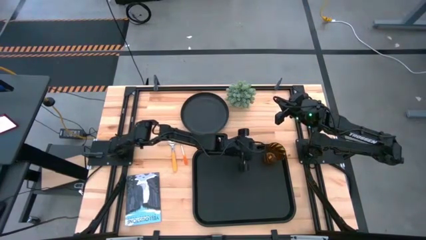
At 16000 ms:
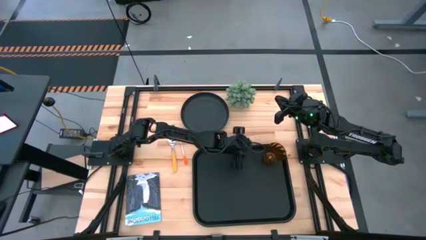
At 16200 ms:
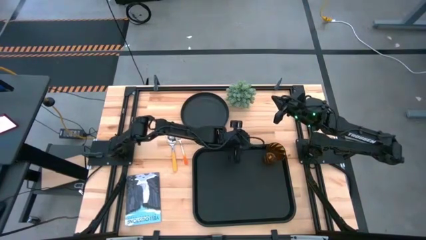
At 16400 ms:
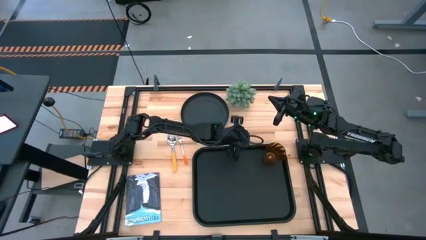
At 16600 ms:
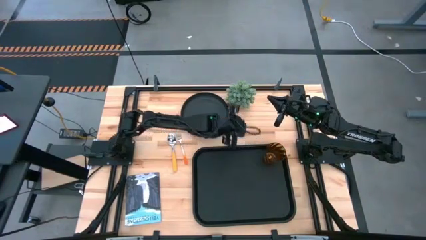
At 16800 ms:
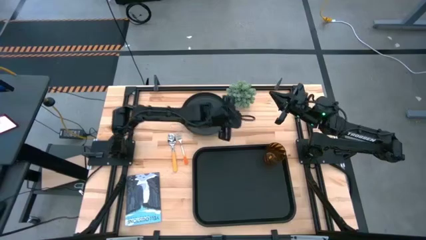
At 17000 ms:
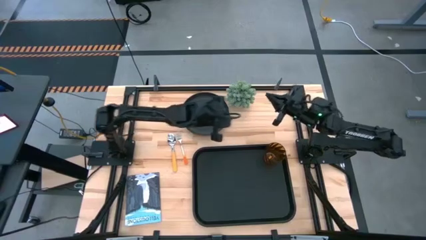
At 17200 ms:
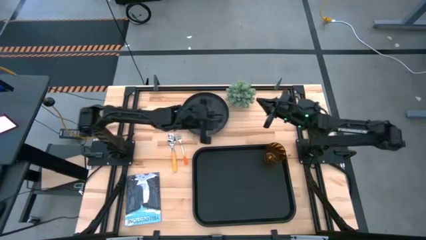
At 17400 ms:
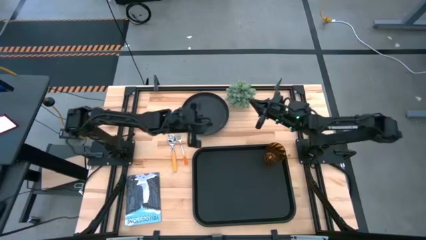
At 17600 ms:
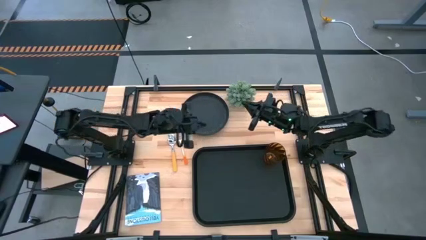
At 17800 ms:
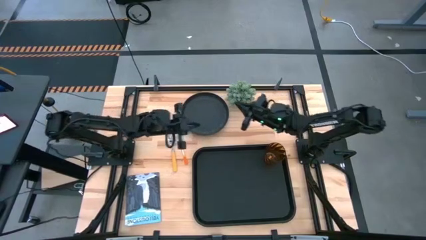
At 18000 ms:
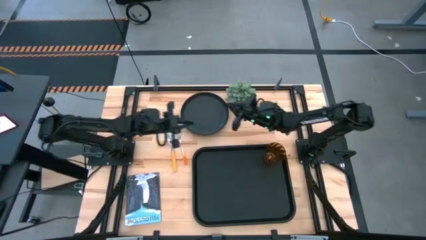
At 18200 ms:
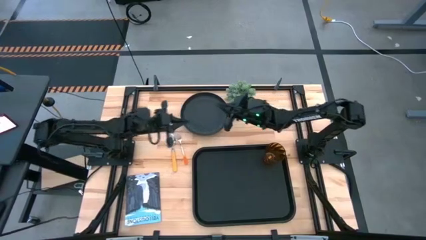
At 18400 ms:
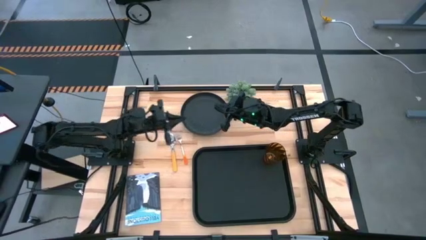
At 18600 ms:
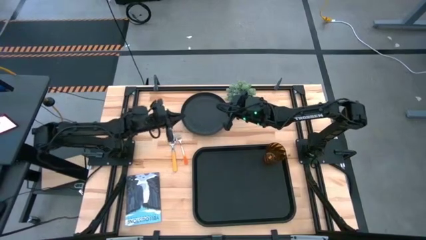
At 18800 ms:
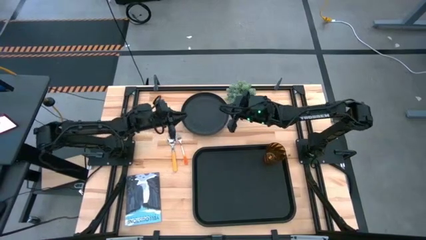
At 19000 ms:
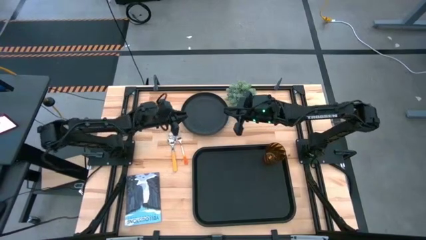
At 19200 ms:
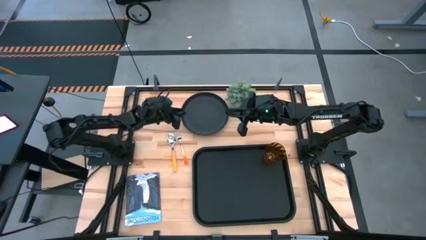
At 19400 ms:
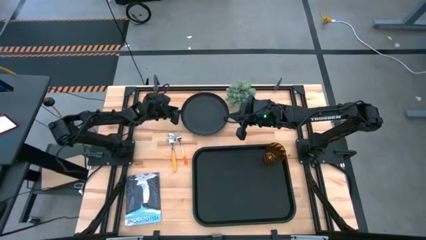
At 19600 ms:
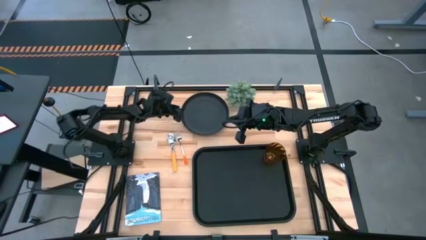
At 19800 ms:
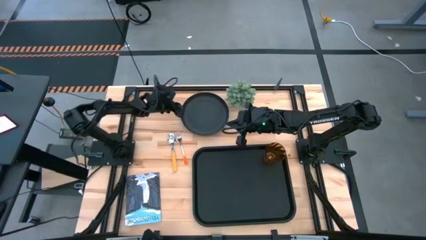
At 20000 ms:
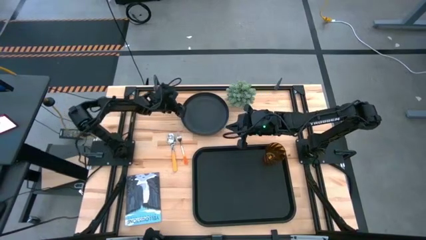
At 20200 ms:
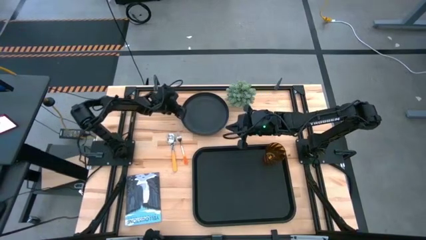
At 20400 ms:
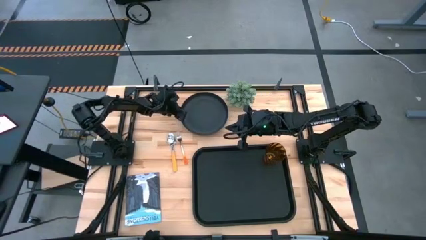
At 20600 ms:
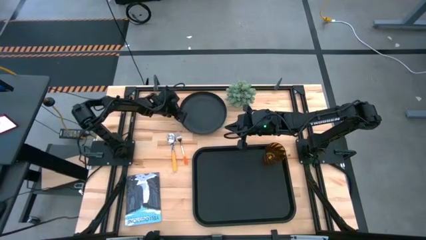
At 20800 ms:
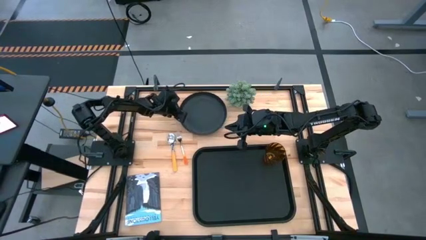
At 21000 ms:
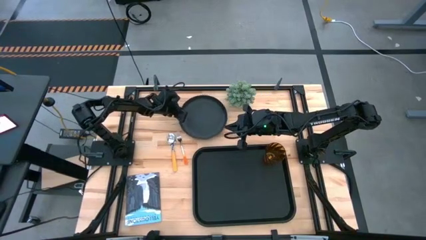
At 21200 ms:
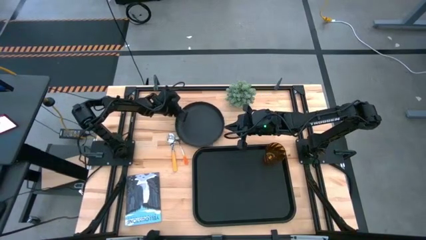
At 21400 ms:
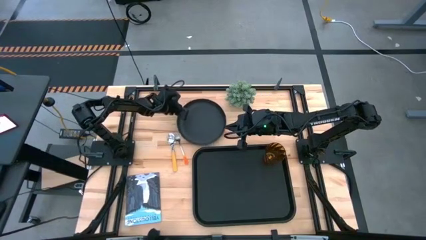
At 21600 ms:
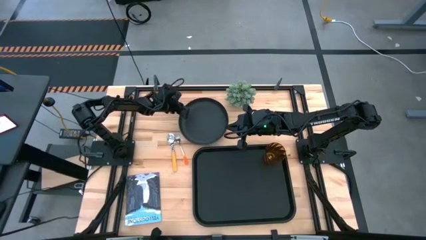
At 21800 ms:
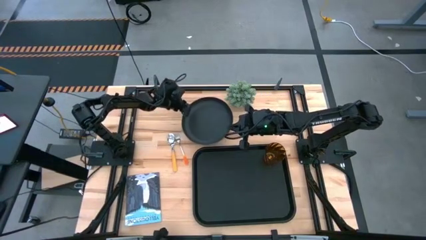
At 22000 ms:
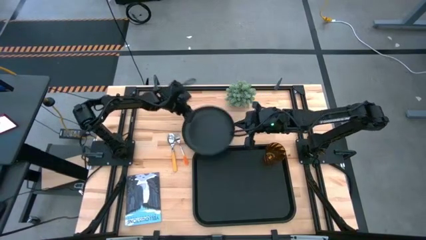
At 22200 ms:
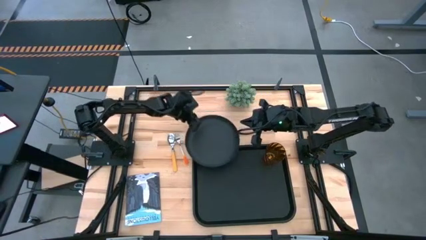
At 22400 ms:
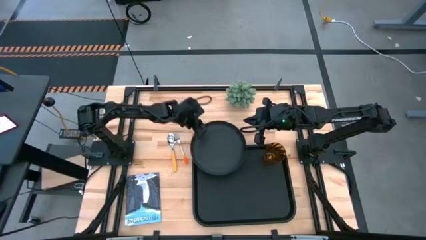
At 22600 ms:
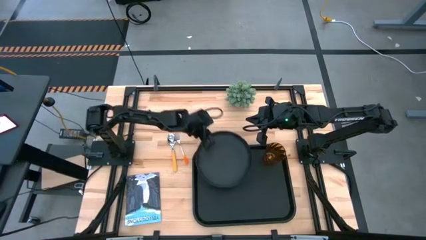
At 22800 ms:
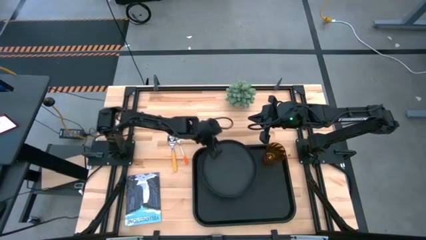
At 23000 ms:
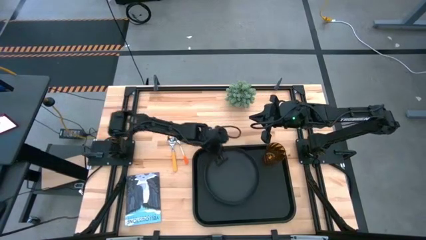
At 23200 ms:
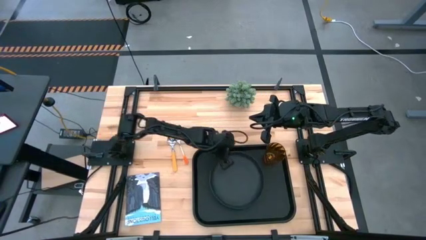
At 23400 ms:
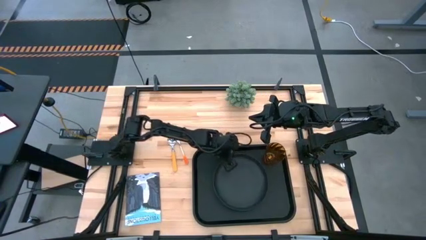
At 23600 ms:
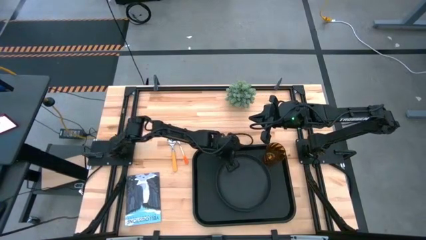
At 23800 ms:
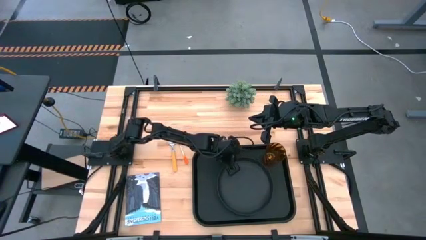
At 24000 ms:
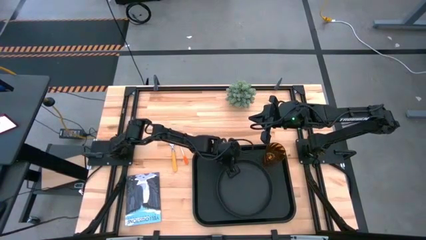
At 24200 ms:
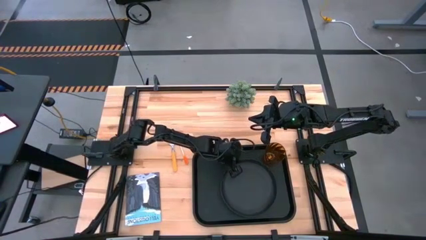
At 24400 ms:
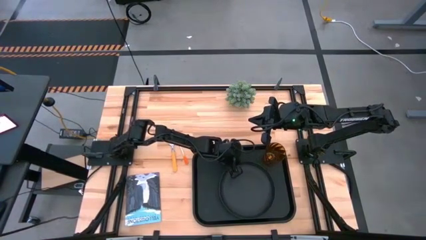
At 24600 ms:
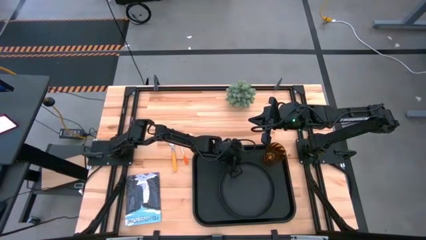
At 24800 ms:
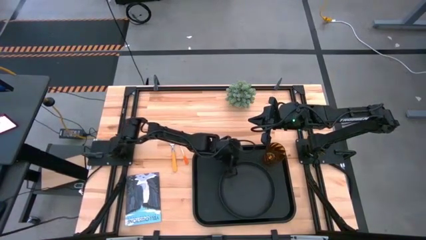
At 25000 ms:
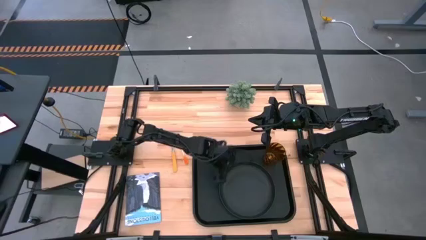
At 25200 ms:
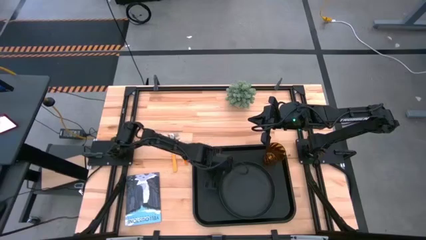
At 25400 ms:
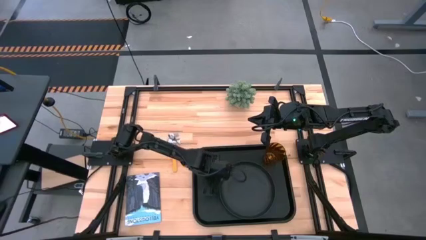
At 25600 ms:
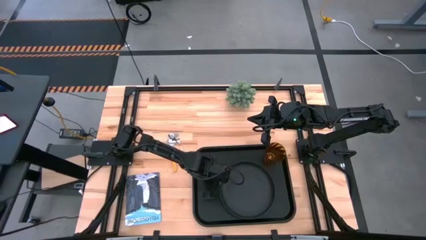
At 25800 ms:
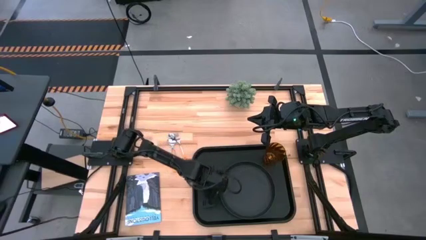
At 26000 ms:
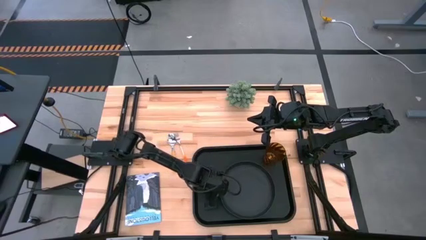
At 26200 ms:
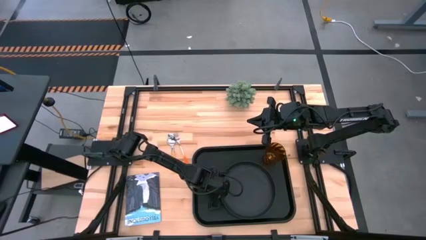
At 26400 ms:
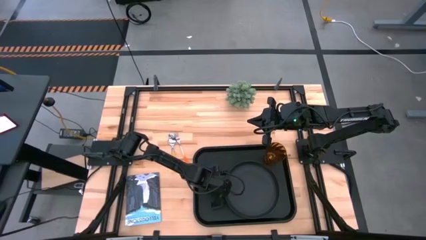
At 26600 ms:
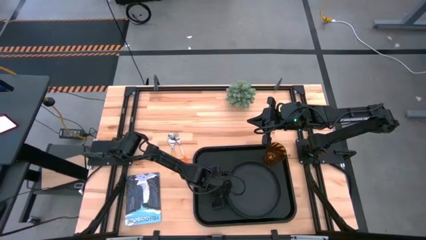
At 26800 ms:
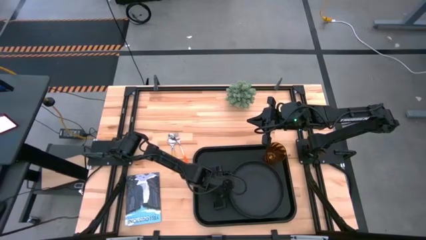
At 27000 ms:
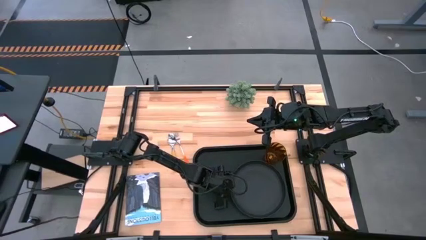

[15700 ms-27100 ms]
Task: Pick and place plate/cup/fork/spoon on tray
Put the black plate on the black serving tray to the bottom left of the brown cup
